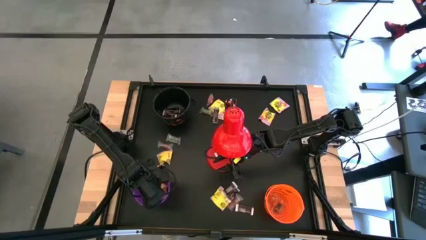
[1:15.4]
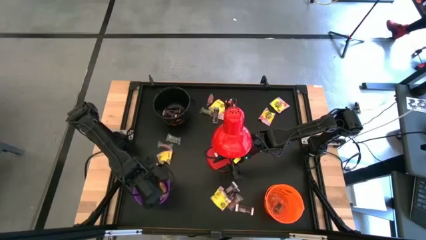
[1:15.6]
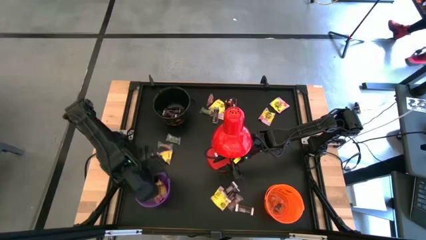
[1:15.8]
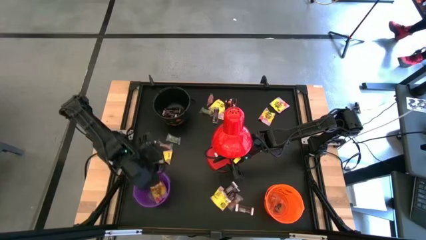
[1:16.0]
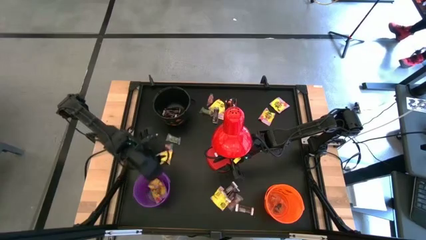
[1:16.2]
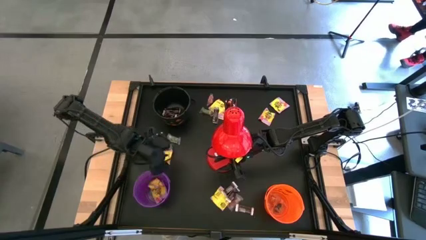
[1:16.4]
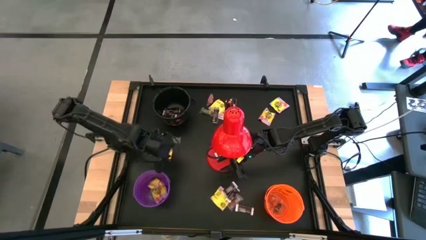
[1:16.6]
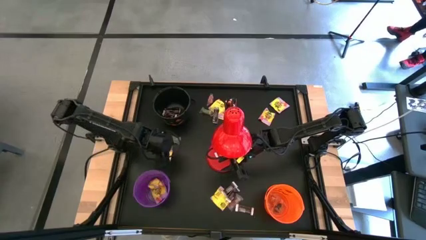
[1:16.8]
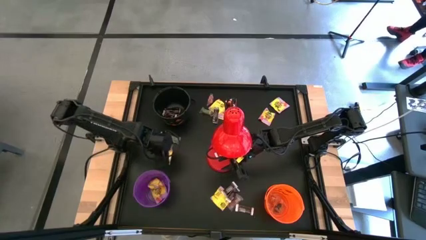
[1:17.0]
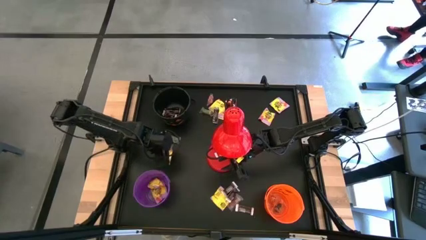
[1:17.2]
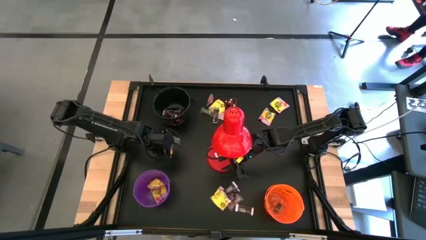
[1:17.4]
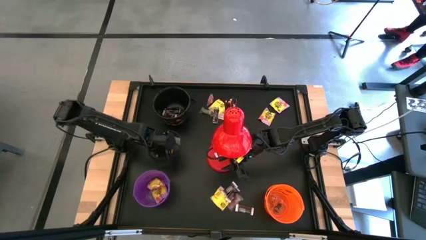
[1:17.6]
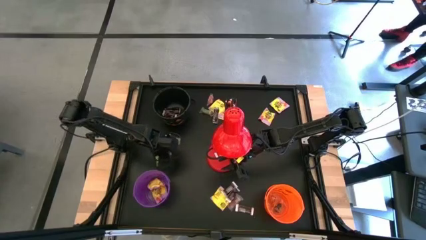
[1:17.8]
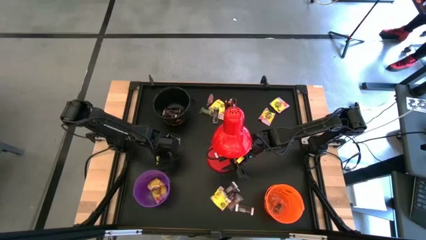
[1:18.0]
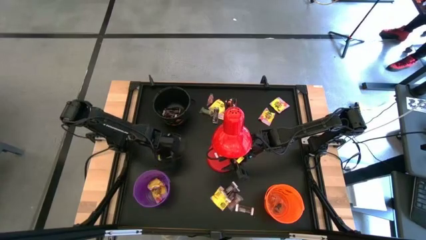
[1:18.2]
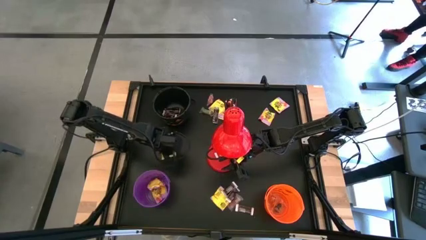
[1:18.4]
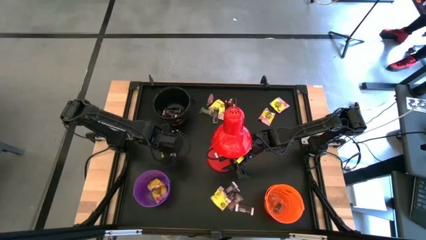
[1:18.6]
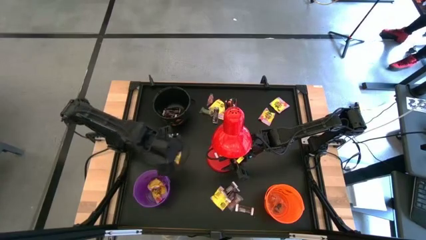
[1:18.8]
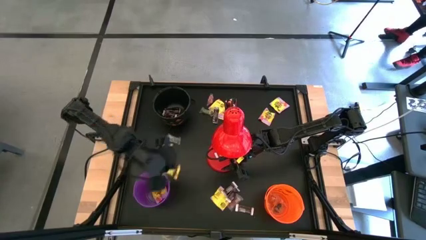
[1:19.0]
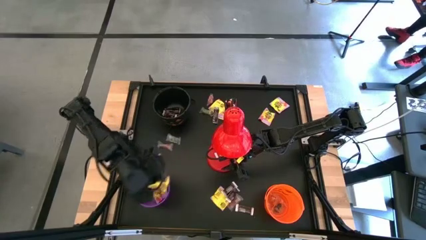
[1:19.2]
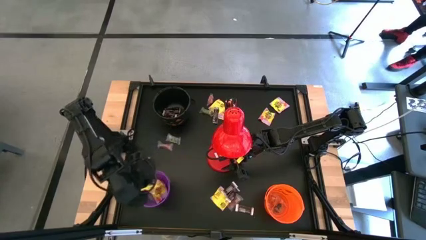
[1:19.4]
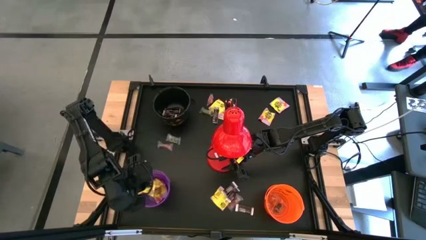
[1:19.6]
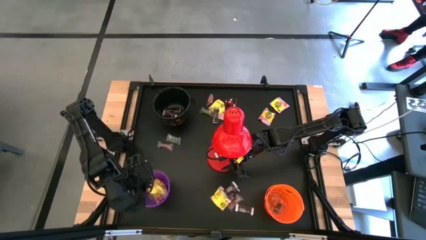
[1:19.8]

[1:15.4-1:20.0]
Task: Organize candy in baskets
Put the yellow candy into the violet bucket

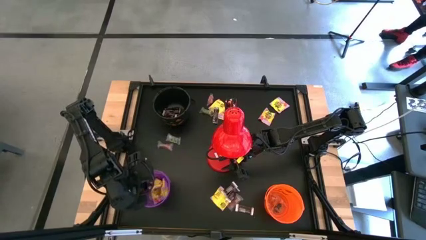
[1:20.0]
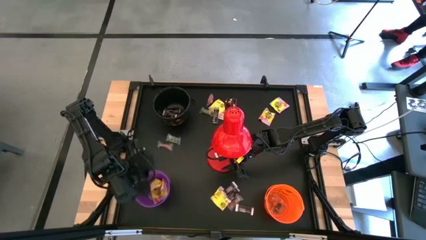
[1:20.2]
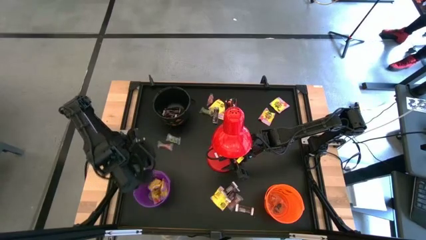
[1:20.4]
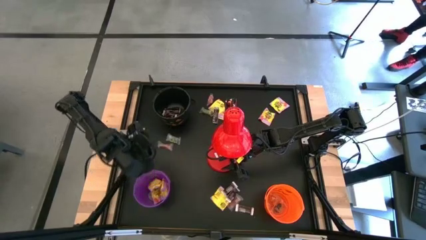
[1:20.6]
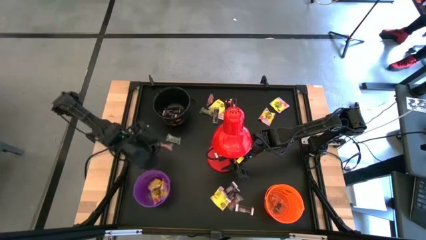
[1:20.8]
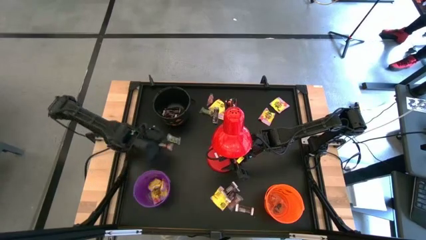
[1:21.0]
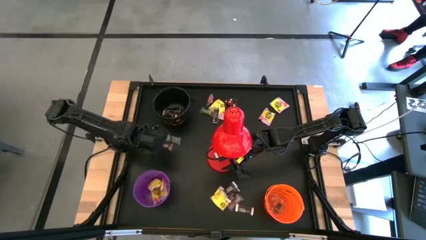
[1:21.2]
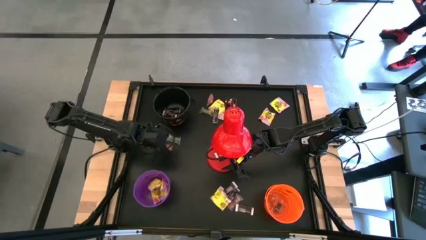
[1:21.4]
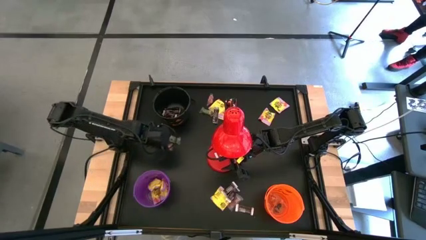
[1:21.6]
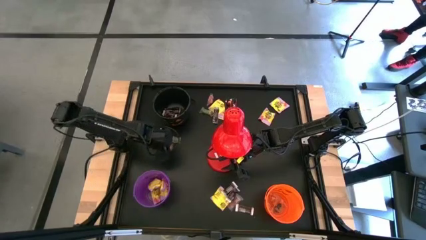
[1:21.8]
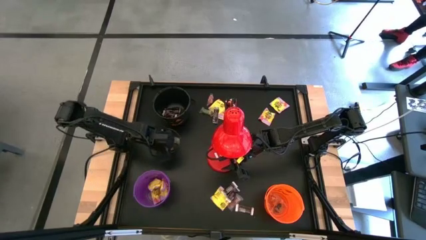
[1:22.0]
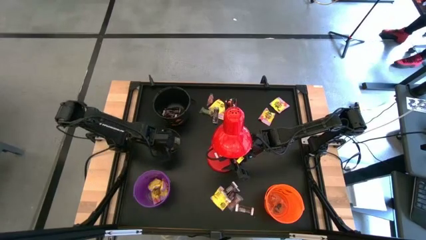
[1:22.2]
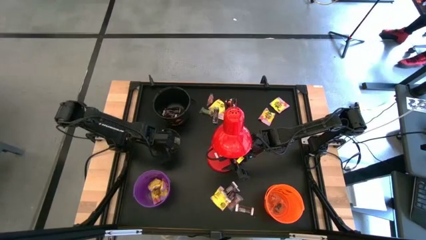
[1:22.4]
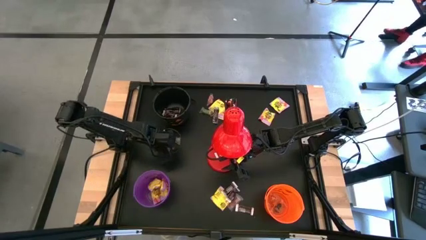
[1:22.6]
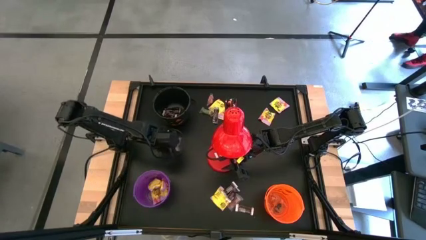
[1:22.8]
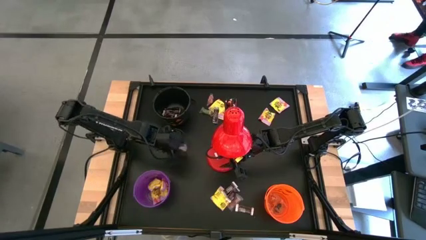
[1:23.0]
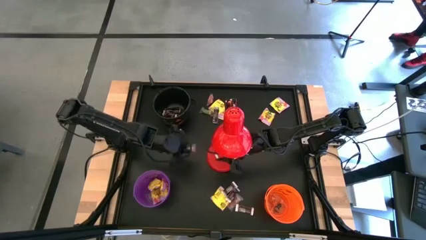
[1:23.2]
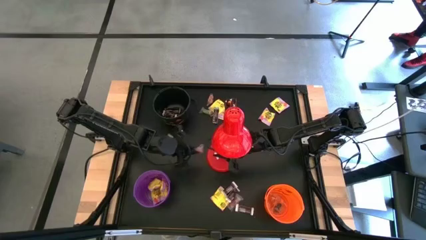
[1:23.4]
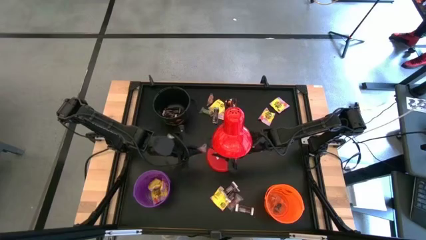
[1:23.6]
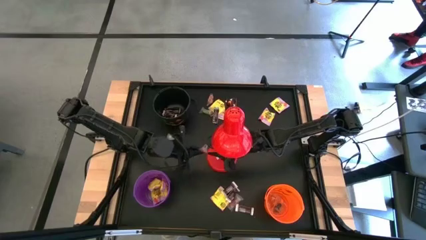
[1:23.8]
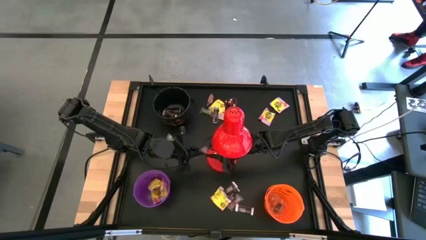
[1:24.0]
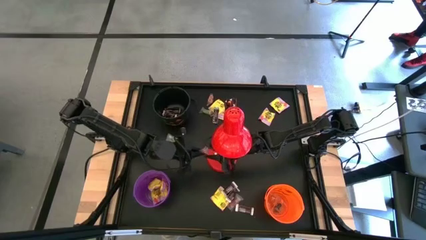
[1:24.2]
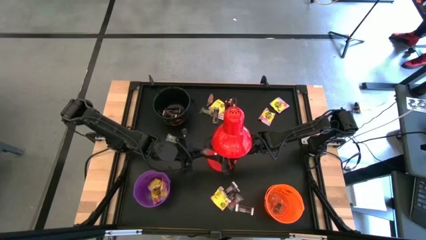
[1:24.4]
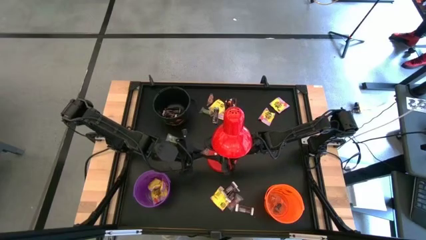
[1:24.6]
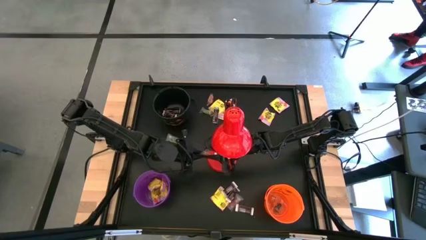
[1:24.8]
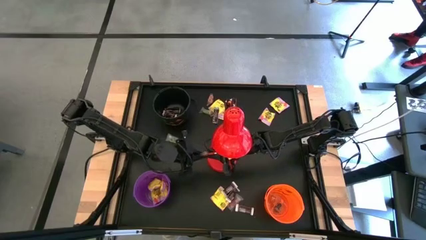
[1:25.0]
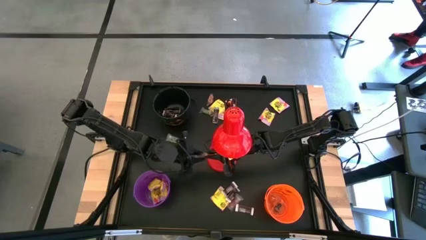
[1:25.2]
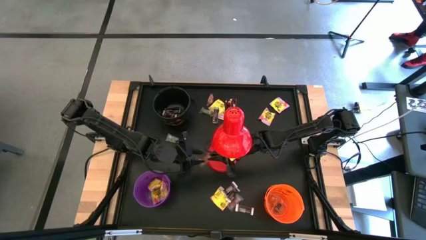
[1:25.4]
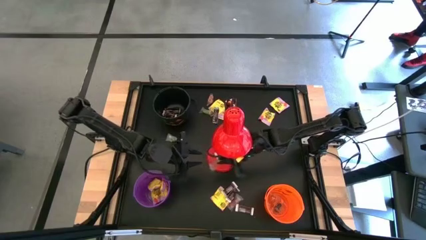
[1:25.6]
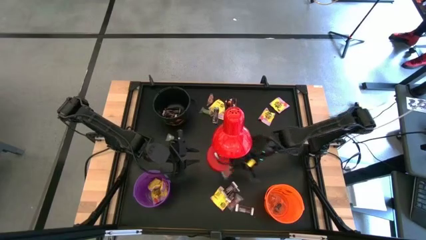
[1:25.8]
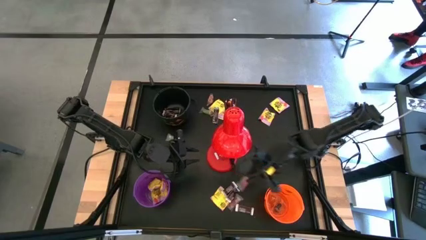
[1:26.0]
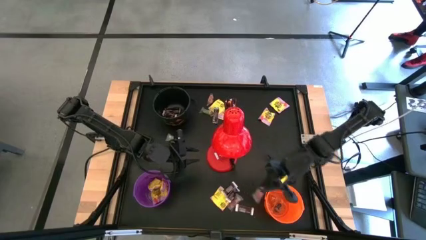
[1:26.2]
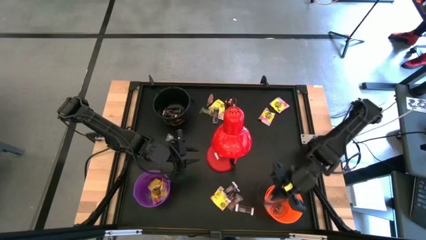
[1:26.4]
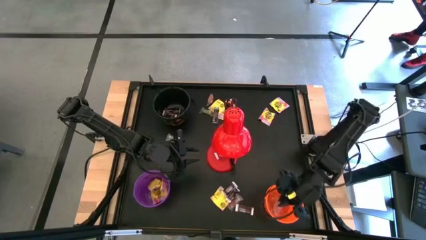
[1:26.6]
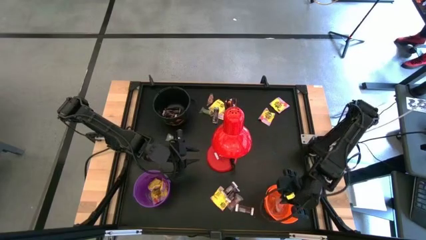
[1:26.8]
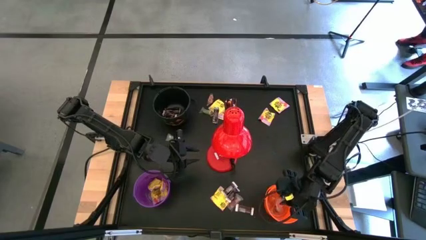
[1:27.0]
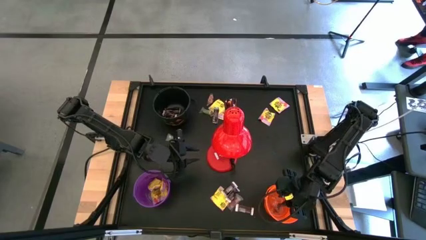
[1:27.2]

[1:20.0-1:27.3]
Put the orange gummy into the orange bucket

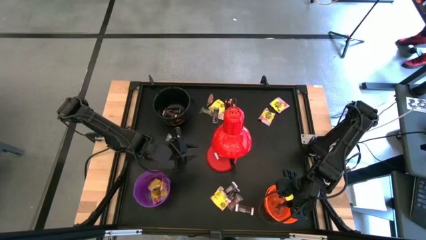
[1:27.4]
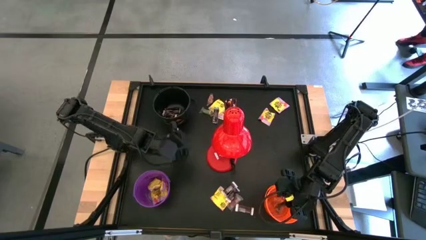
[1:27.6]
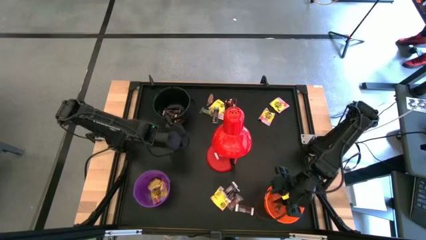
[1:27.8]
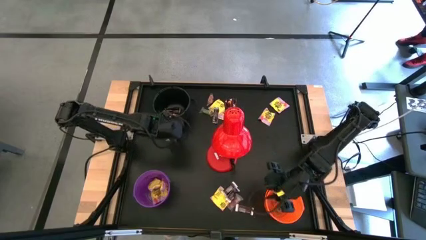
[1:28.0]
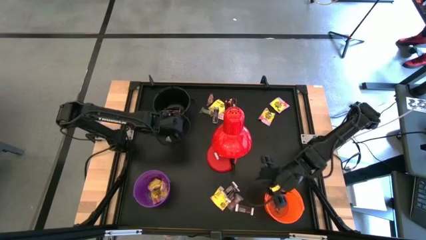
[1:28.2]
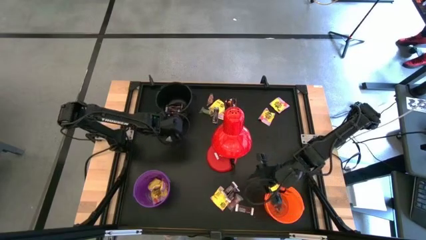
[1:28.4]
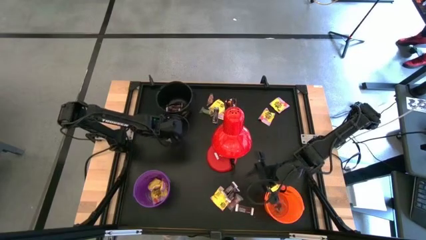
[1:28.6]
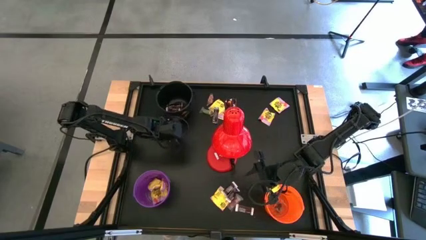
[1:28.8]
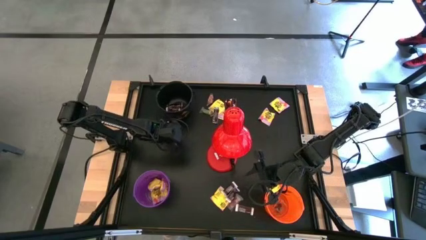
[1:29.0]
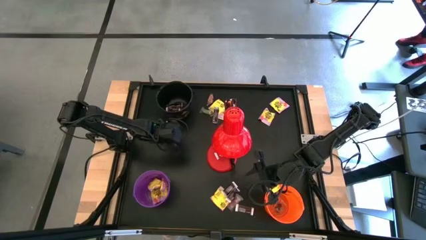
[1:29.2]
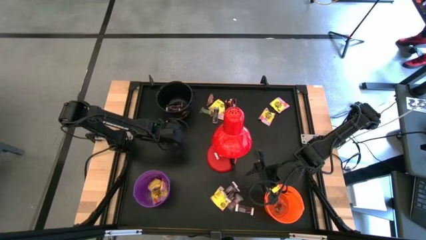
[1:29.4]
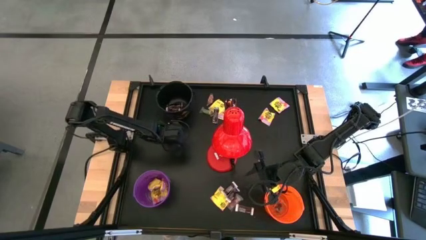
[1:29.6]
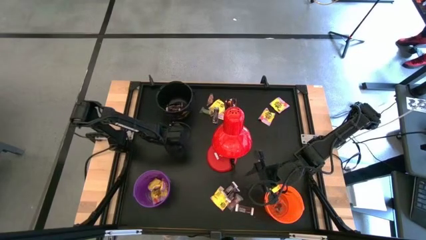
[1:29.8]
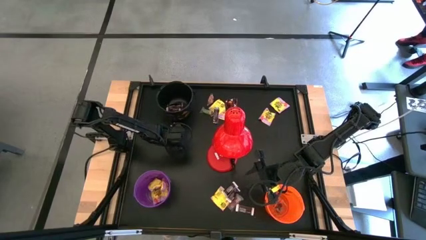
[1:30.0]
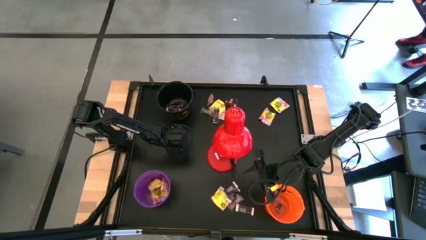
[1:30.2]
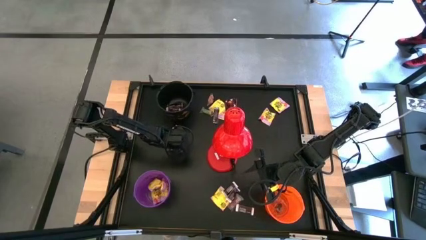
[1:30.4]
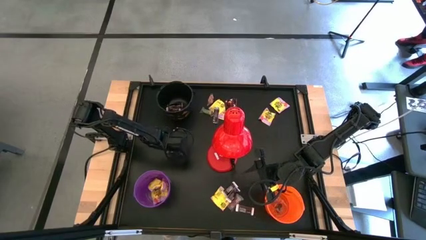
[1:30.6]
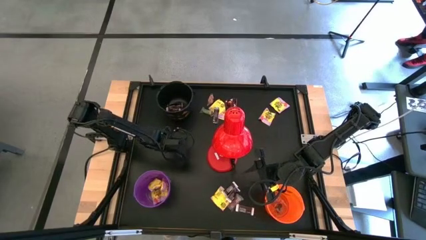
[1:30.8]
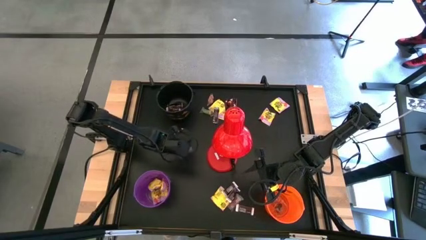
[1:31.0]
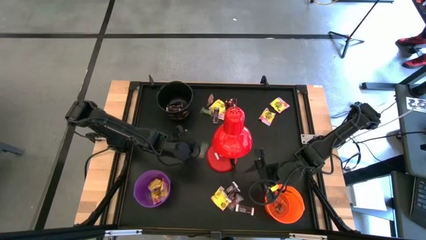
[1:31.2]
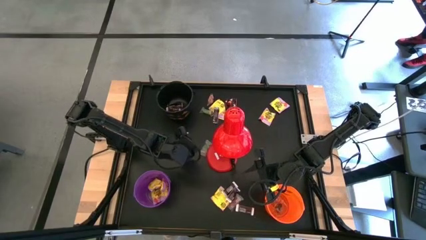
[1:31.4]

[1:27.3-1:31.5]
Put the green gummy into the orange bucket
